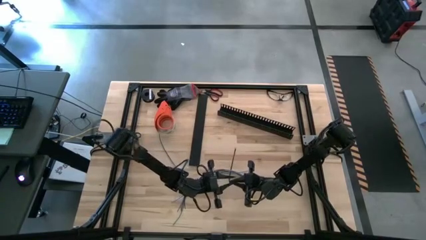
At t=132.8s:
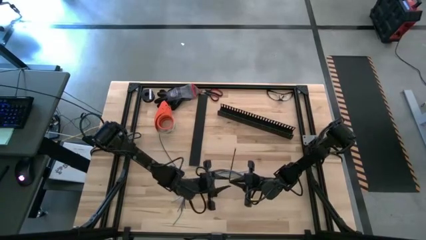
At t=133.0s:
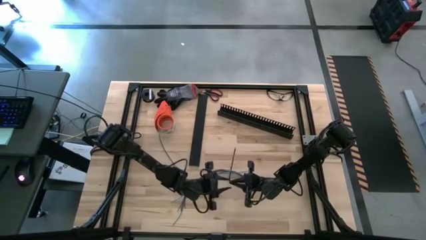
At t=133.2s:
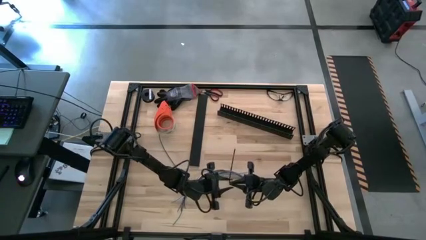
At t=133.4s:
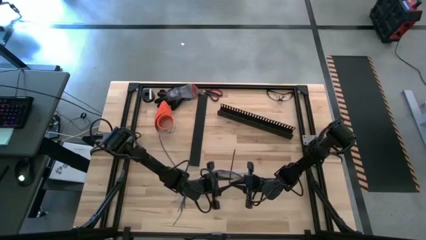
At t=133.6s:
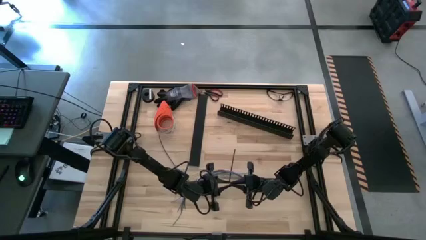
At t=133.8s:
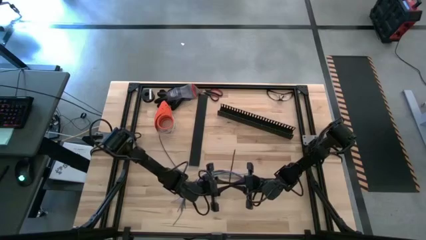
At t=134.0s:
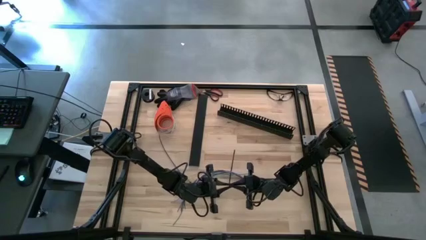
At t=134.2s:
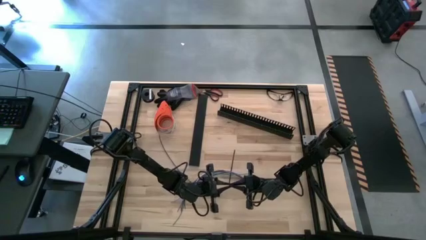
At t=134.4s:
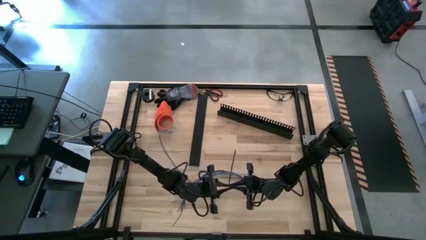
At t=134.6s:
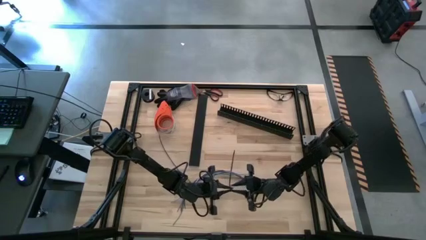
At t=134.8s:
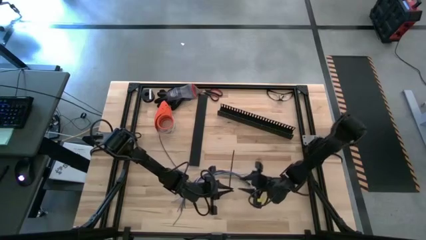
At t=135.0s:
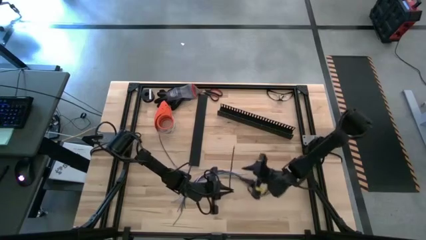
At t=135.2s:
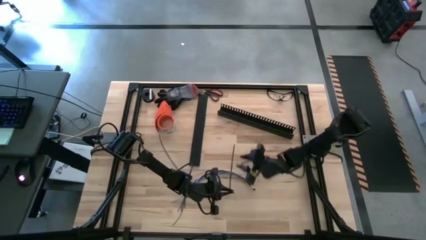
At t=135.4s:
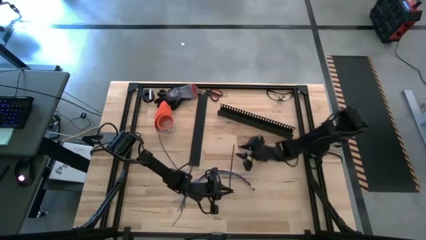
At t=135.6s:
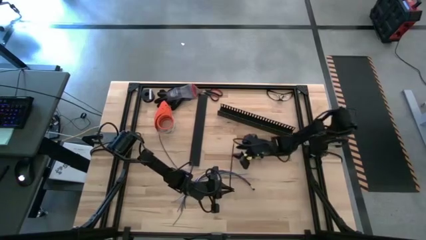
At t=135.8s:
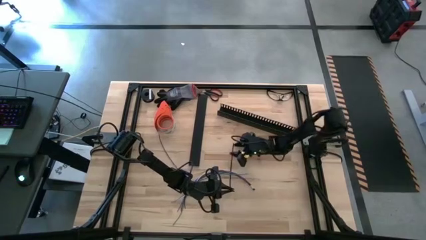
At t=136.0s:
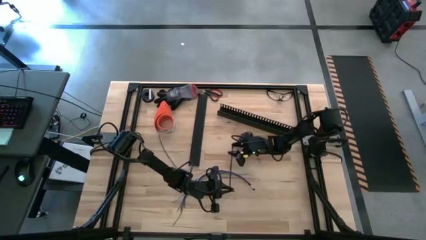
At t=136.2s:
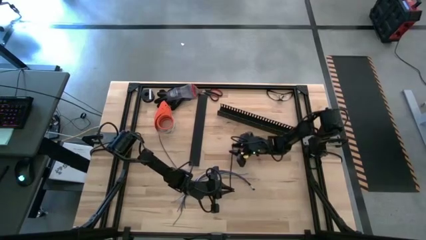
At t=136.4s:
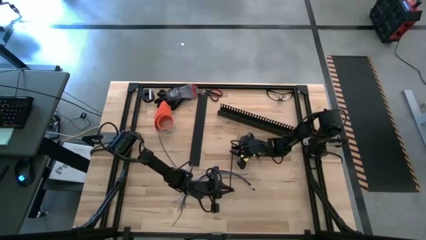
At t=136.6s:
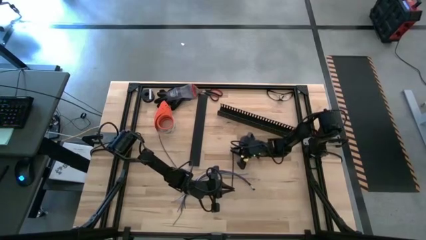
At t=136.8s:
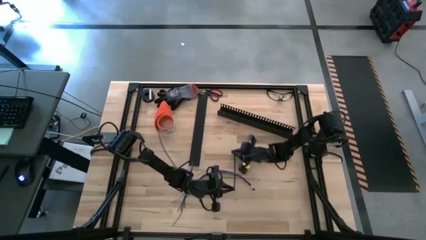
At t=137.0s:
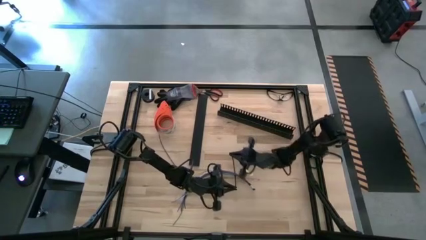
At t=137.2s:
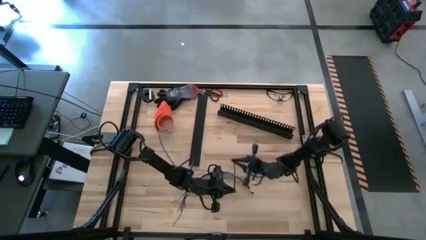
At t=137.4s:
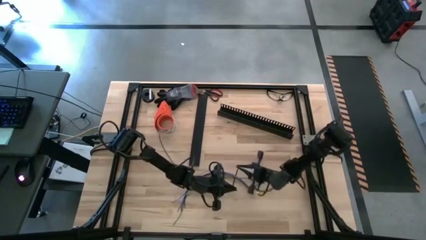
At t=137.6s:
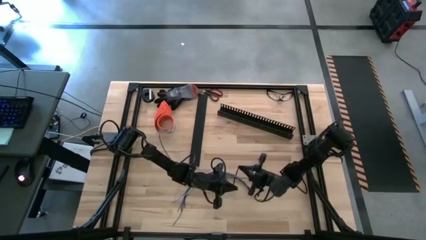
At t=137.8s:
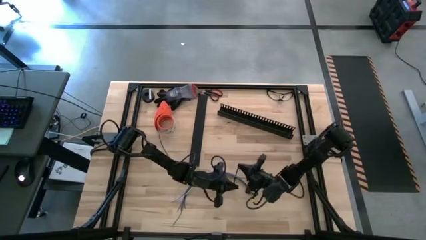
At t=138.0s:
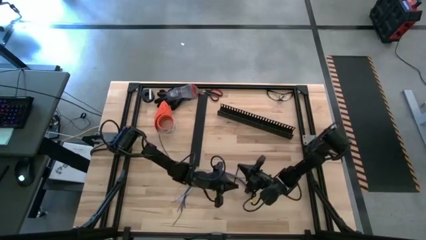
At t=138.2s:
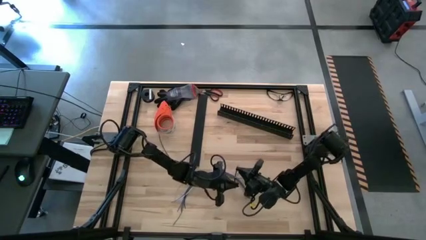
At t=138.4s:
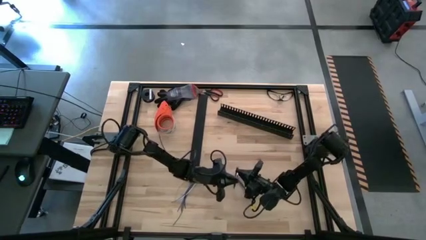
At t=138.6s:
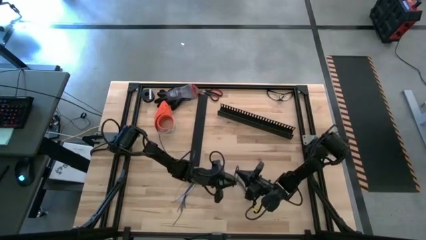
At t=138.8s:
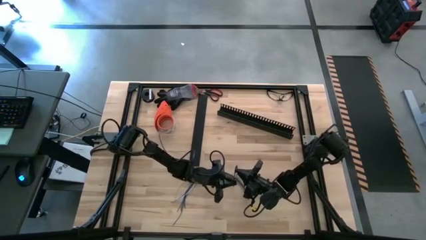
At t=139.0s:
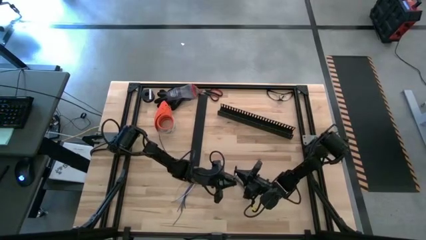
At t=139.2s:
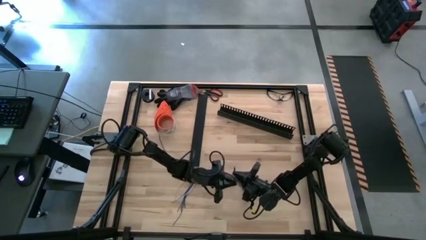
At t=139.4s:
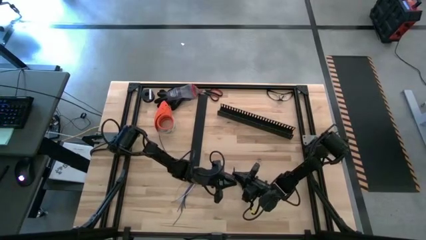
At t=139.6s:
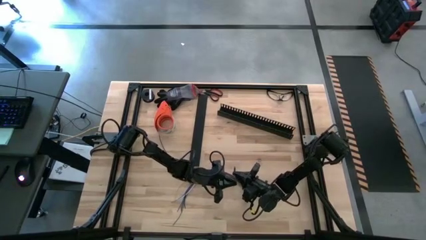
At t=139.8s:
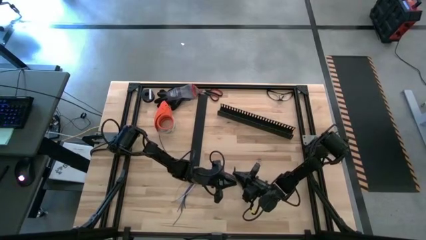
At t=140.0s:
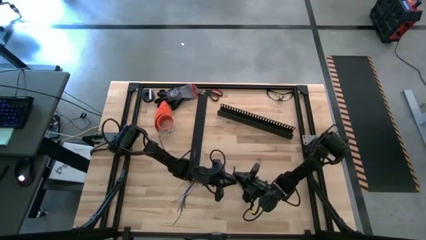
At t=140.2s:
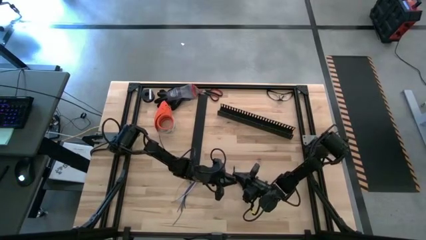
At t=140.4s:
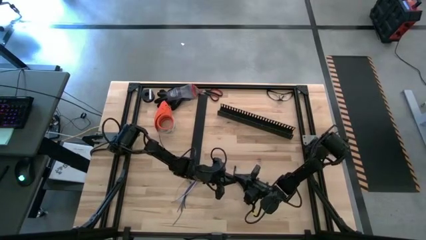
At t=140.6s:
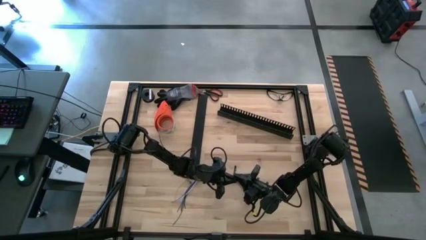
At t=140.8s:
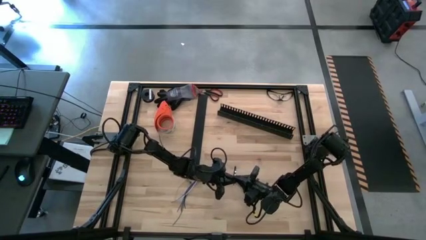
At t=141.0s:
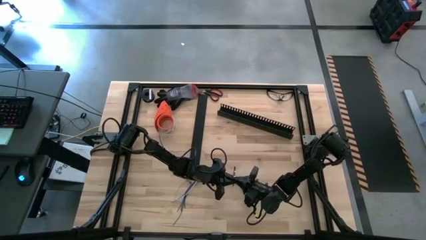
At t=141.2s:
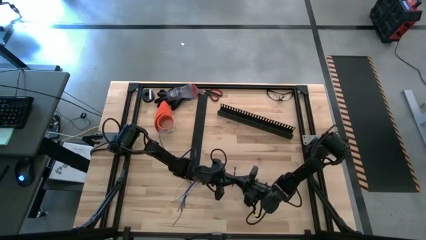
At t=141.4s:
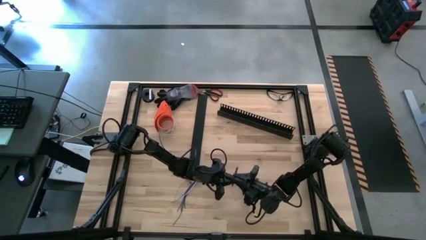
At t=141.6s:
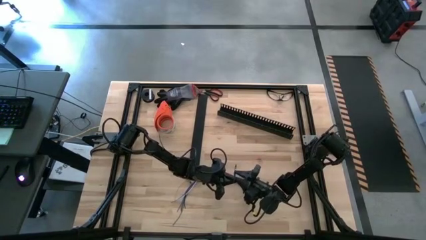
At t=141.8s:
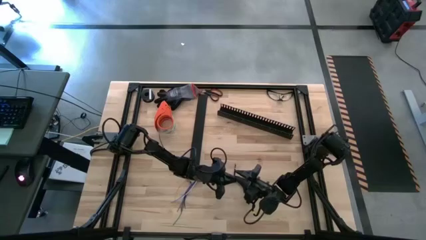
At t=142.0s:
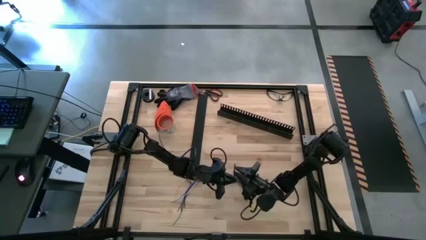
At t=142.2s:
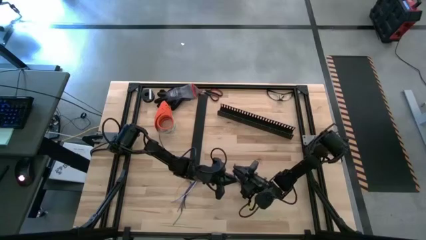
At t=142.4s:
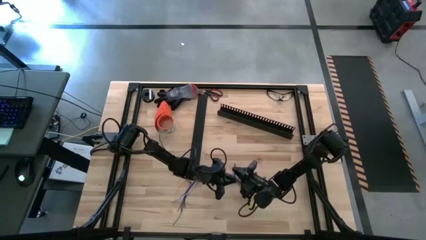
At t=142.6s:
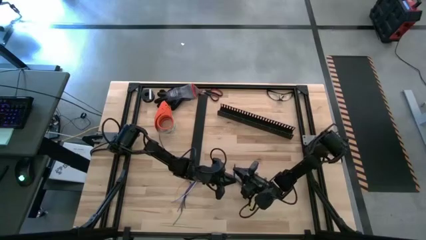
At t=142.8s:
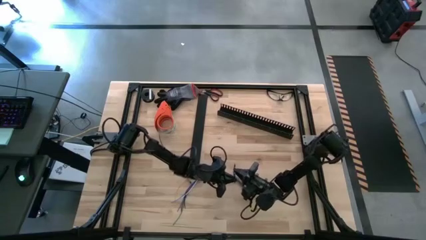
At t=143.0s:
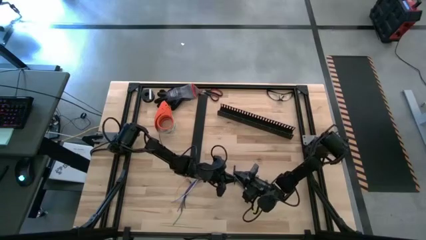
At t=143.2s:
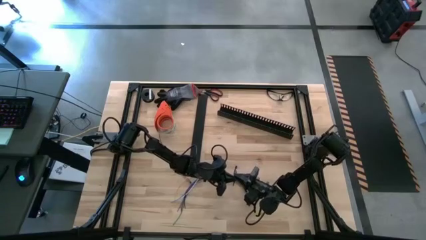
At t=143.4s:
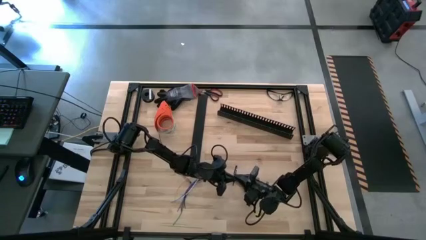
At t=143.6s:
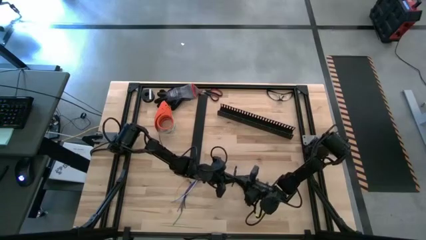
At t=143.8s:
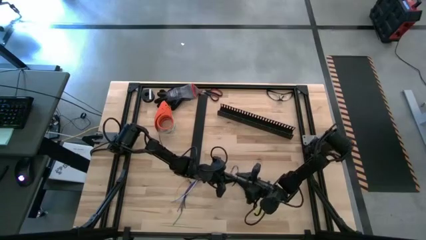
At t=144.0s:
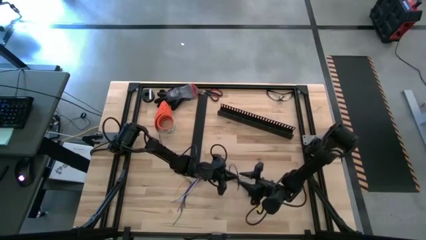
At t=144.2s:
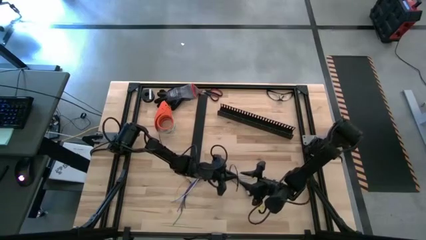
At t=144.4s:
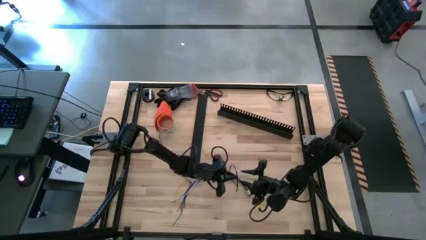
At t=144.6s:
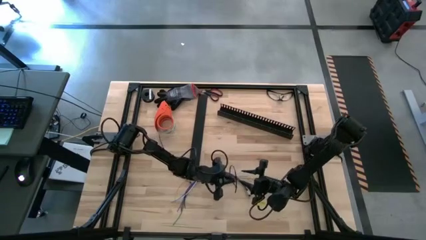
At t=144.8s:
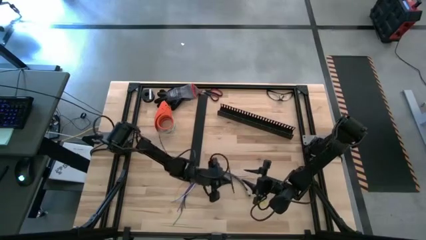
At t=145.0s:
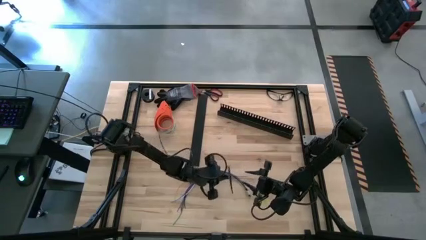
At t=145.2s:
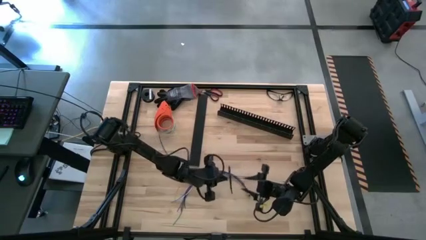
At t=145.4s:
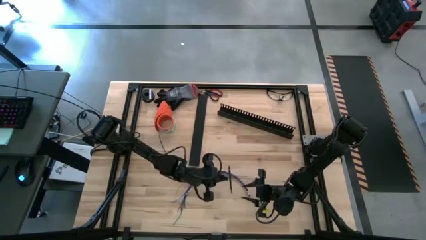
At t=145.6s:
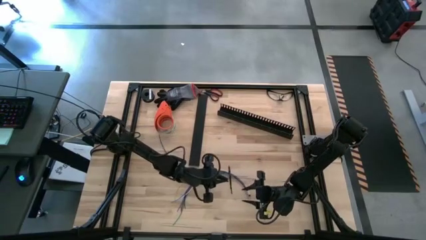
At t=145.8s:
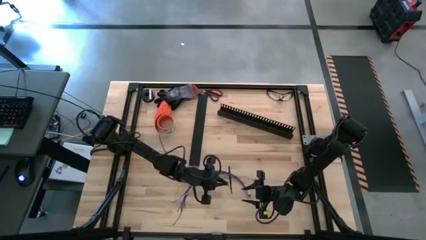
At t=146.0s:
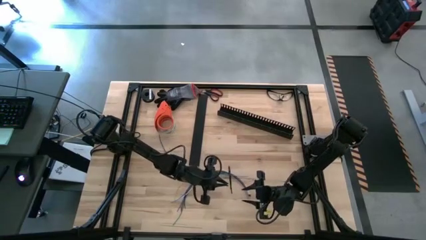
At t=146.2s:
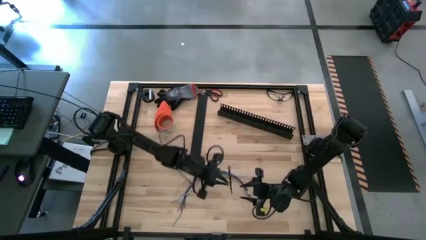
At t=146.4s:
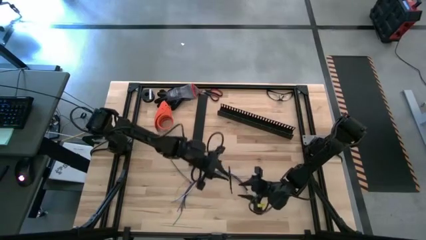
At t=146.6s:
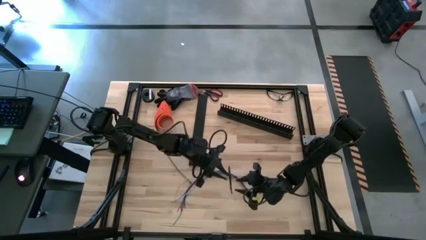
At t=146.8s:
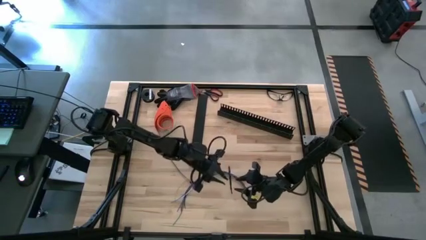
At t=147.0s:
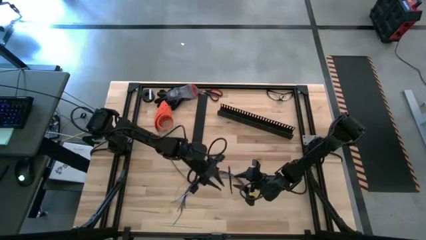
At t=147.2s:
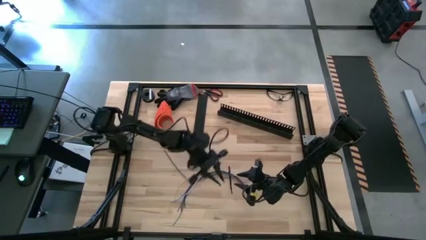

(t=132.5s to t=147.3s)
Task: Ziptie cables
Wrap the black zip tie on the cables
